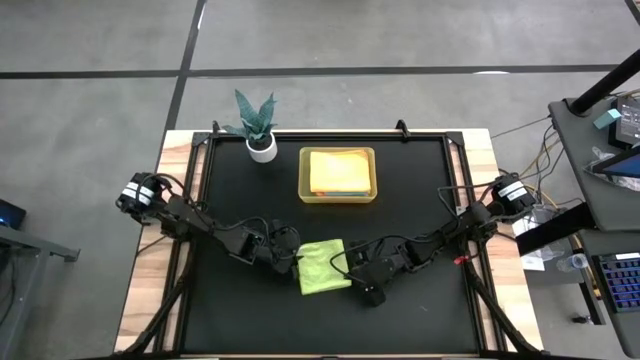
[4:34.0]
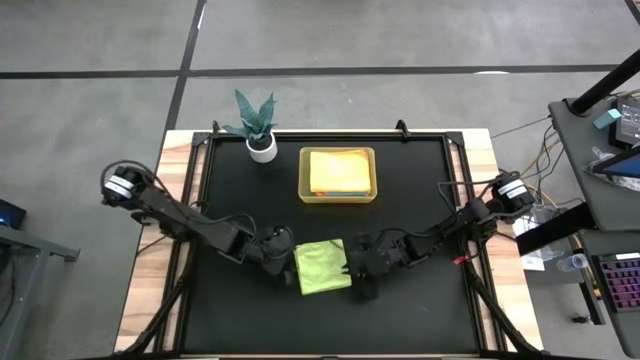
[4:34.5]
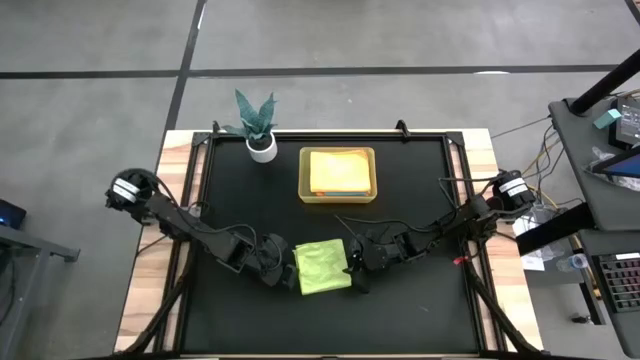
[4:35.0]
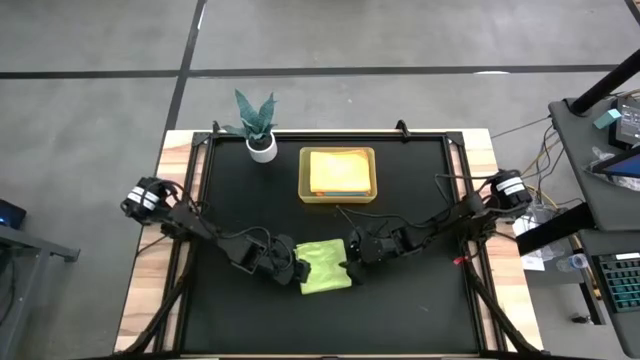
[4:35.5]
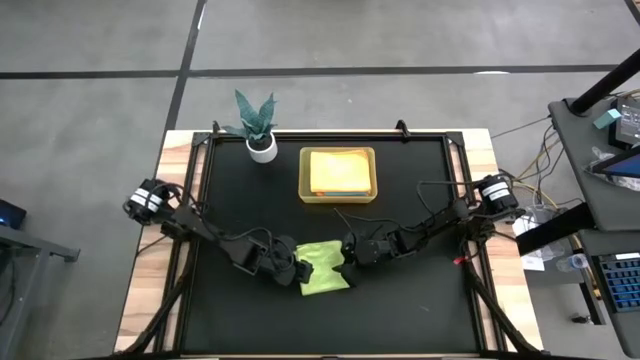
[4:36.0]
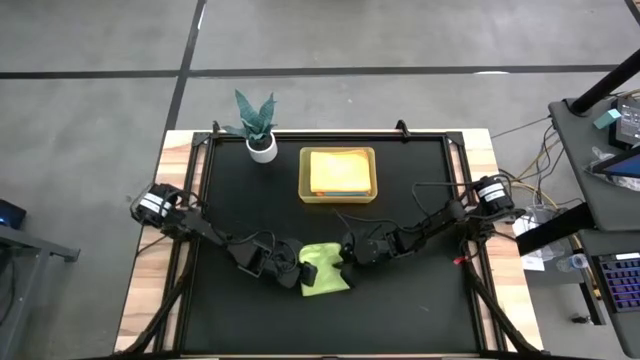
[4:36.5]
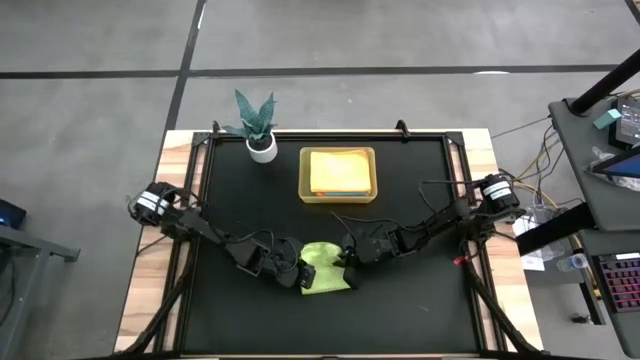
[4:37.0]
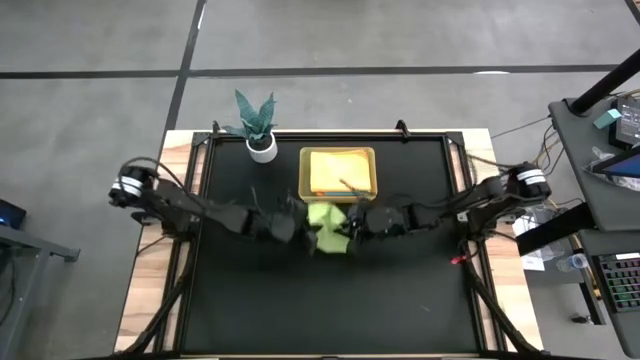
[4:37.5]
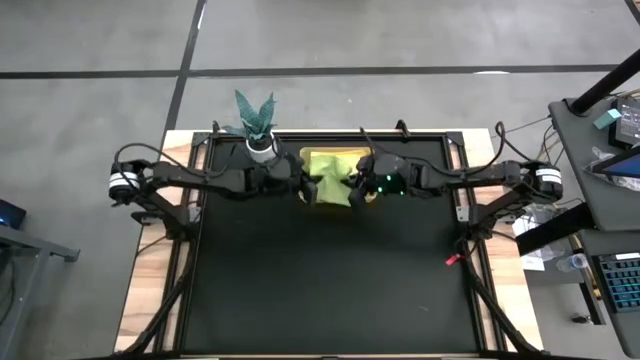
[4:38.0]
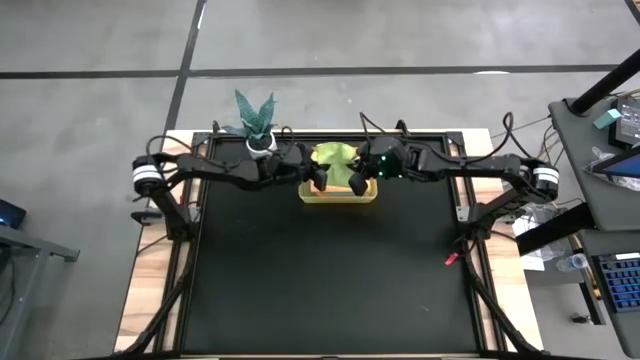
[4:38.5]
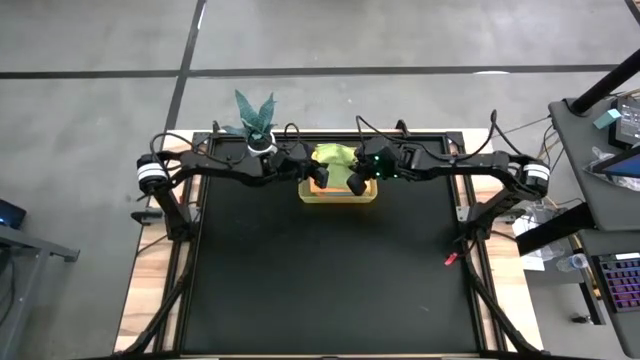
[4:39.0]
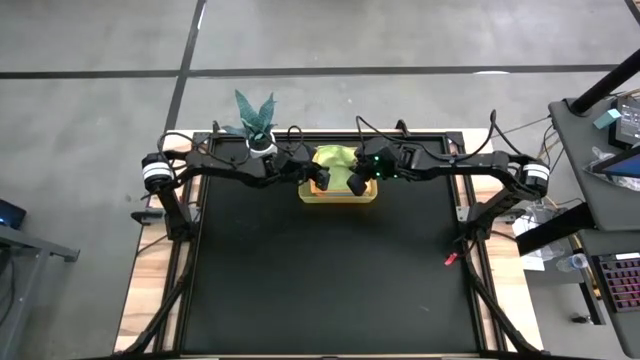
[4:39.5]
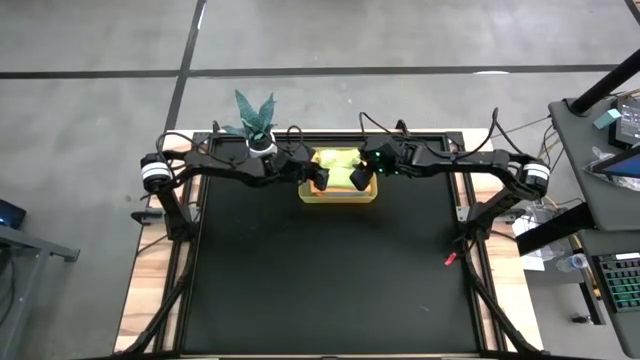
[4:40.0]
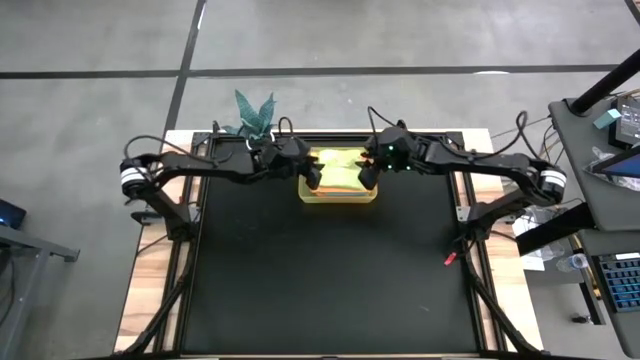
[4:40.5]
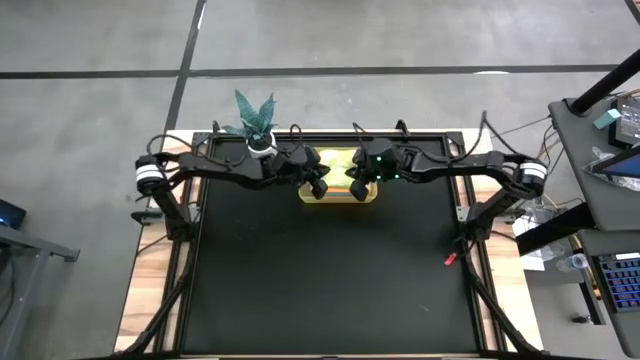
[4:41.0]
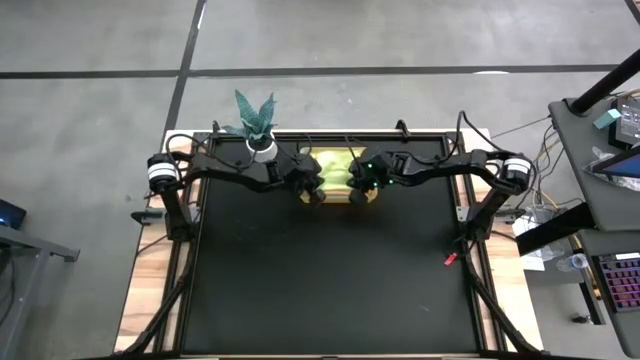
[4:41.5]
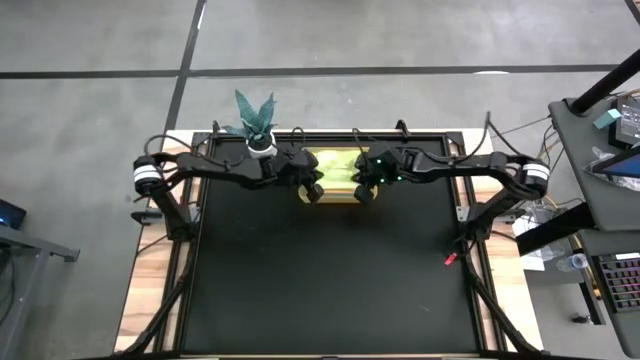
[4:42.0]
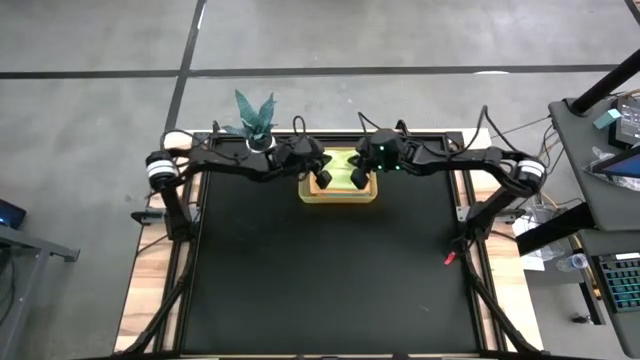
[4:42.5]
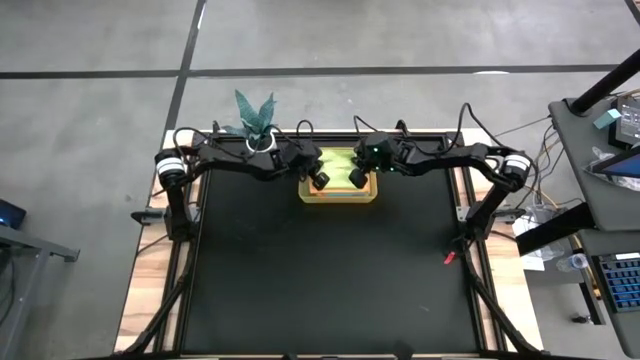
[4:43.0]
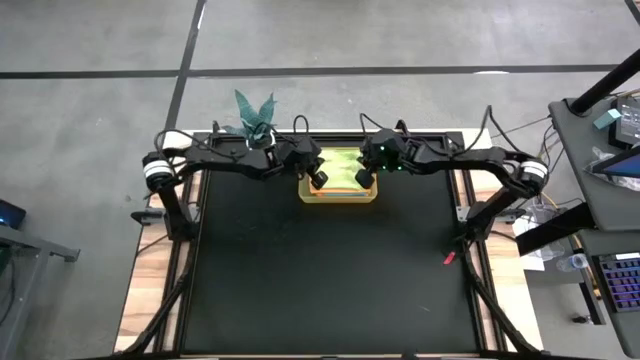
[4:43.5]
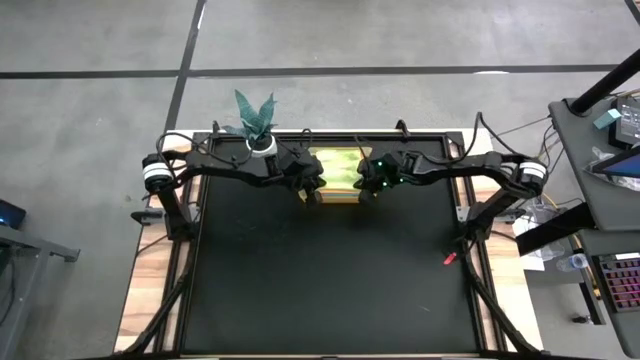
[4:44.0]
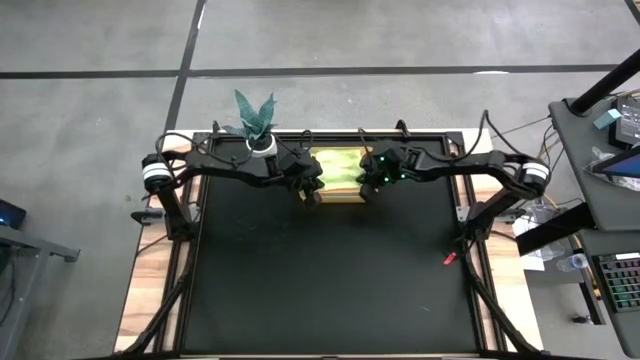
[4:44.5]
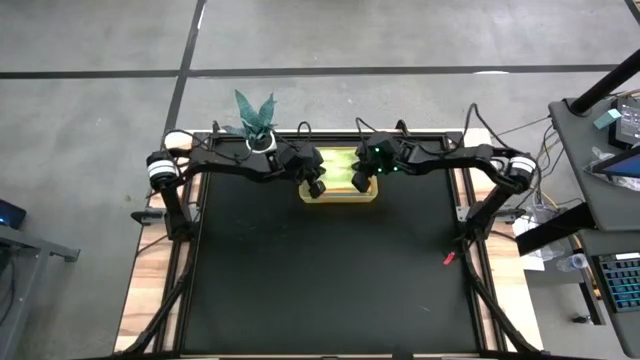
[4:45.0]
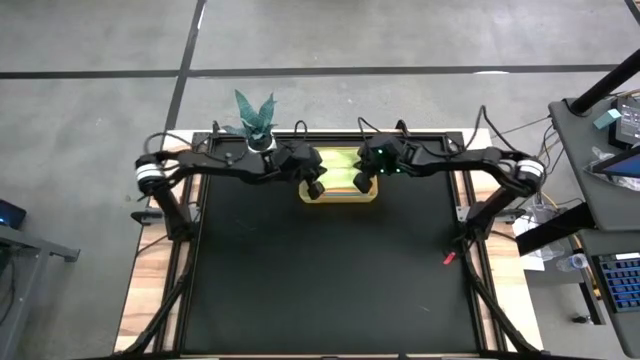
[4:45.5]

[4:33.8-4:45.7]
Task: Fold microfiber towels
Put the folded green towel into the bin

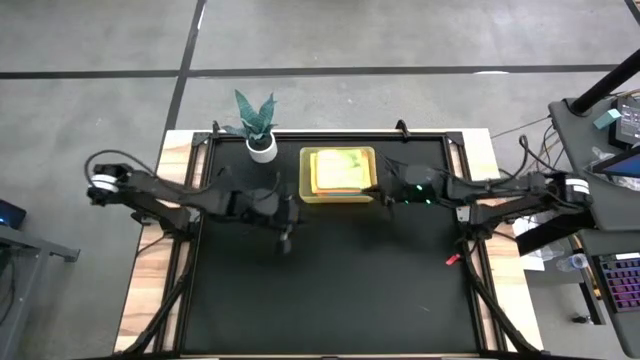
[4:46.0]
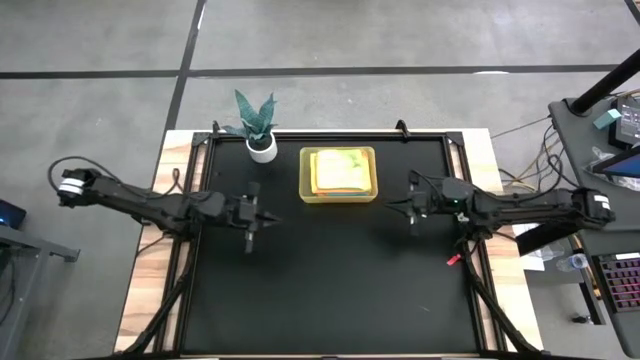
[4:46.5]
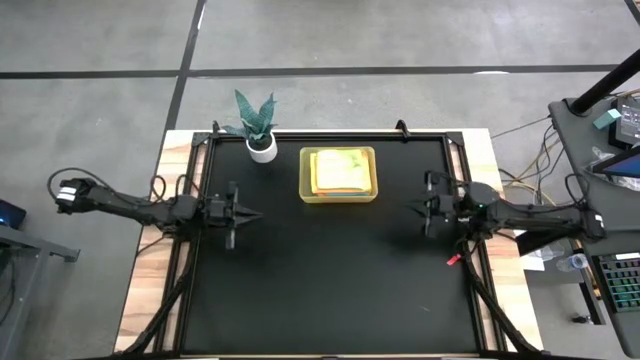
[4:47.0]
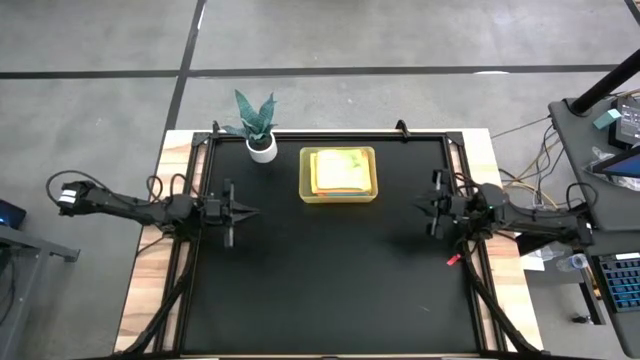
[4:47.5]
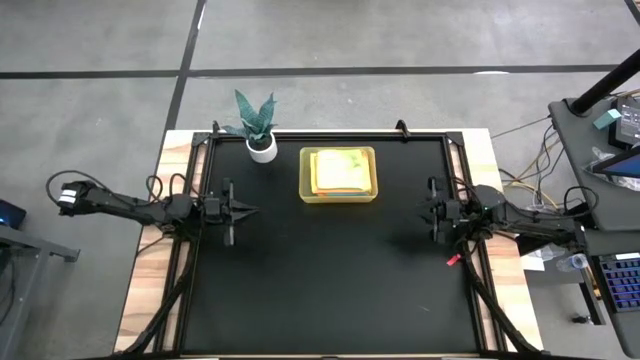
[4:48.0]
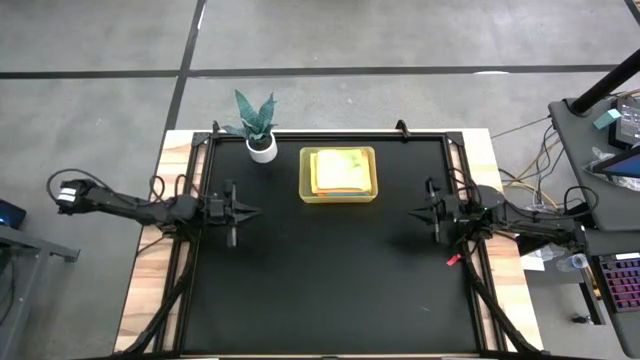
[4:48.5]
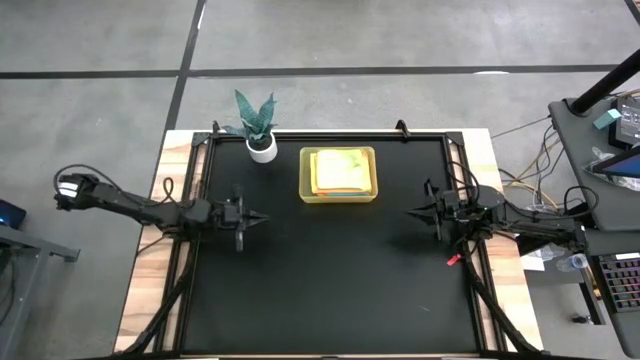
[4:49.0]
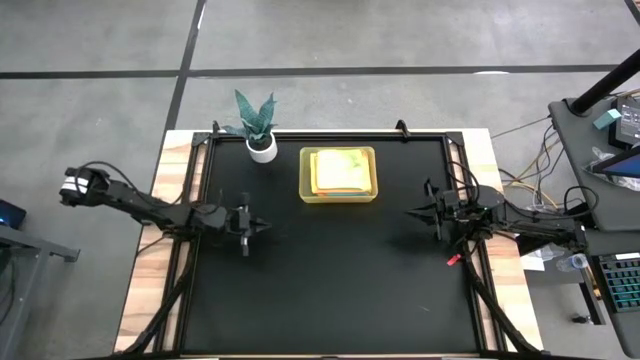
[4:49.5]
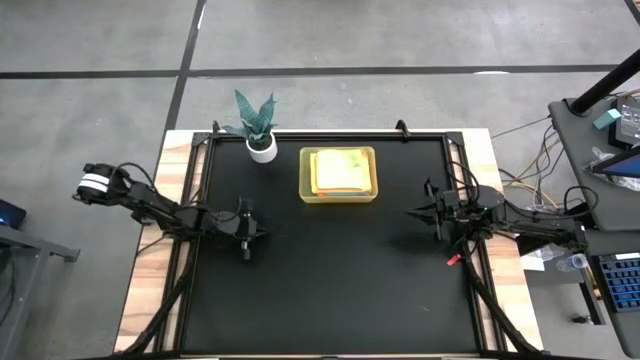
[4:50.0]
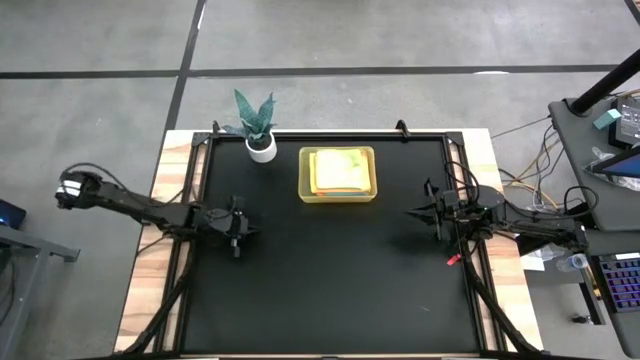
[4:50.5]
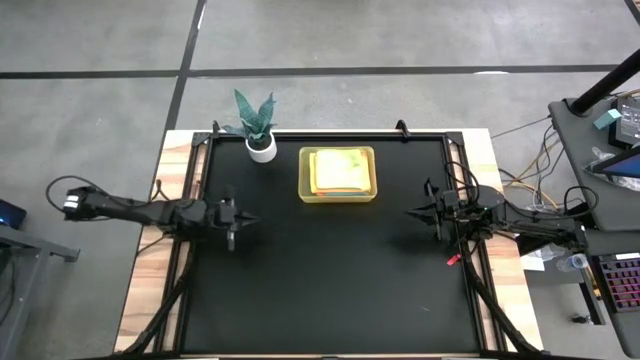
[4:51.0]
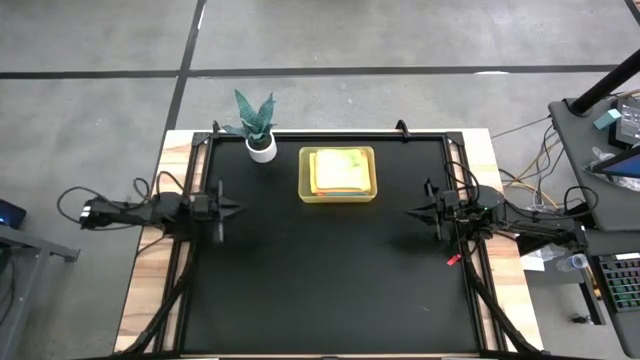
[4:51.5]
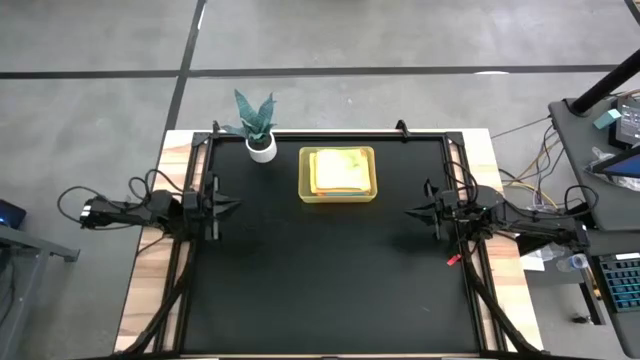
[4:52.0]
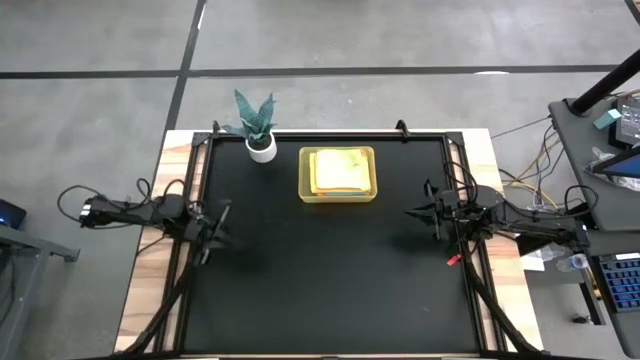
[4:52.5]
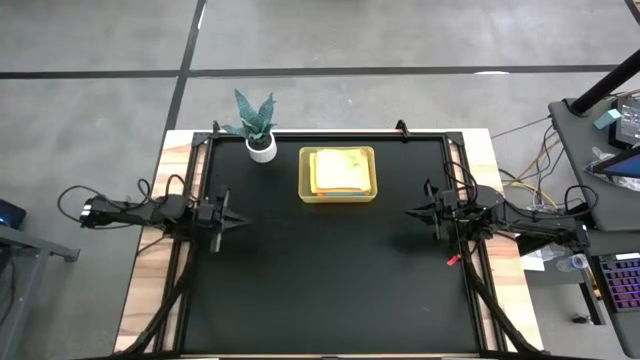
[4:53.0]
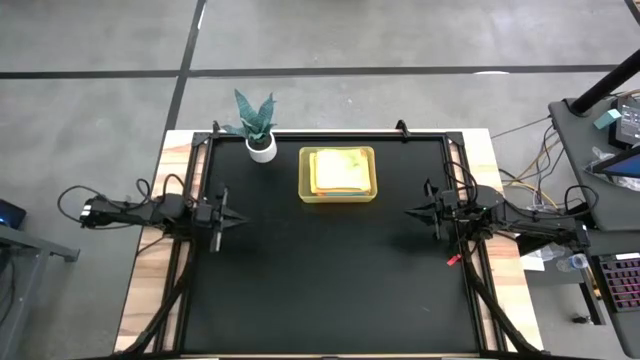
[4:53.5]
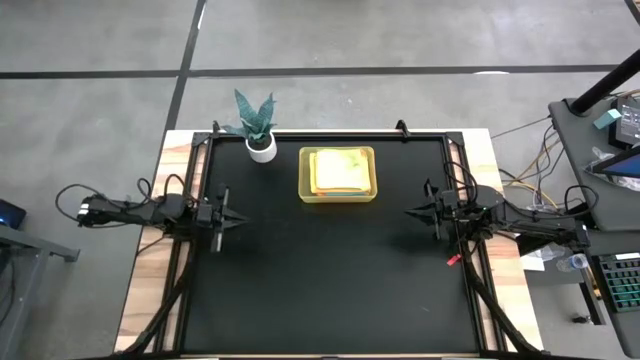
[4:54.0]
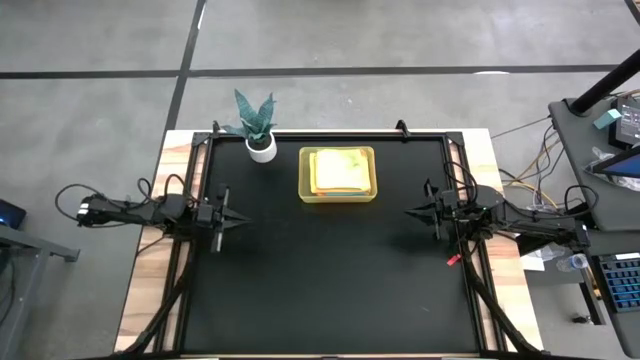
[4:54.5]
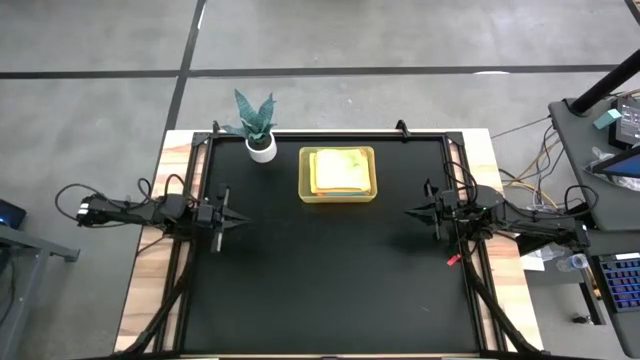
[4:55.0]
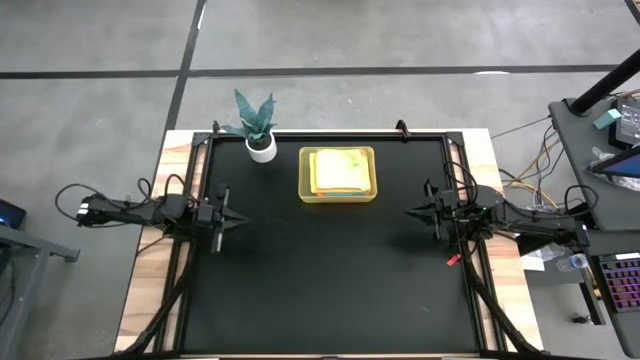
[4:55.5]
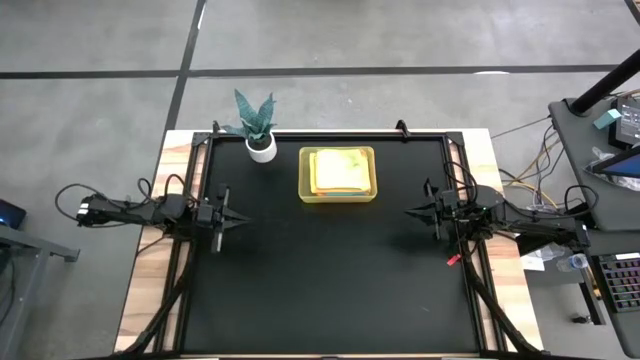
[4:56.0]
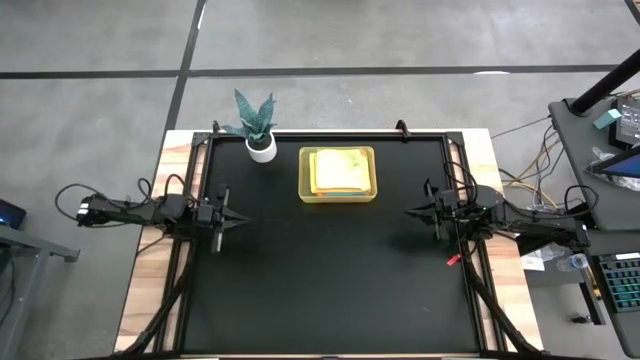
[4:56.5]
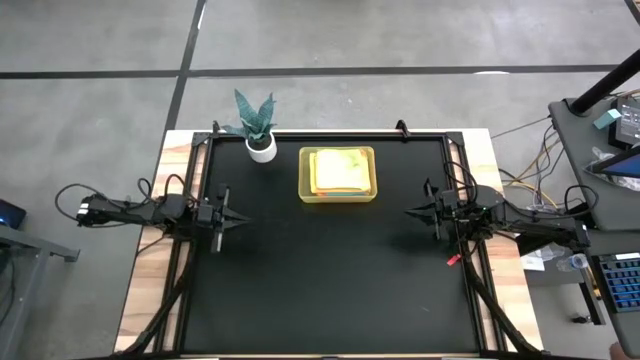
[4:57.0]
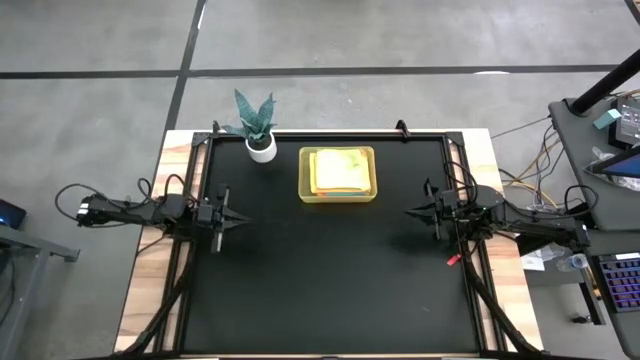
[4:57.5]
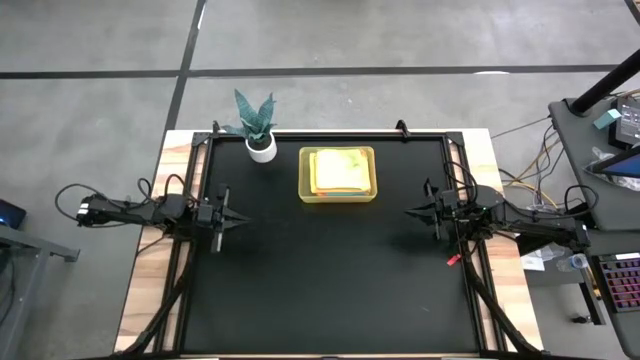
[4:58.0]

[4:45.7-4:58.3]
Return to Home Position
